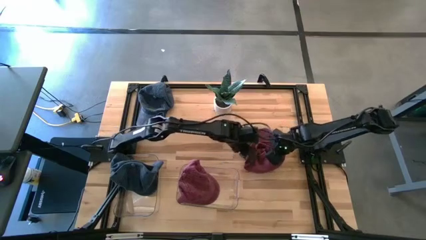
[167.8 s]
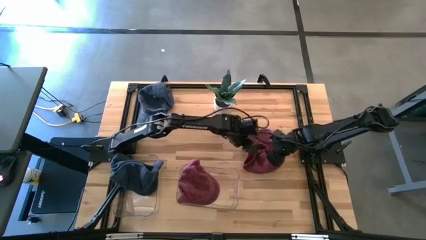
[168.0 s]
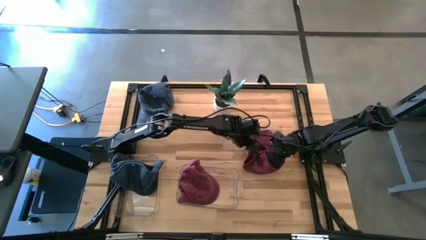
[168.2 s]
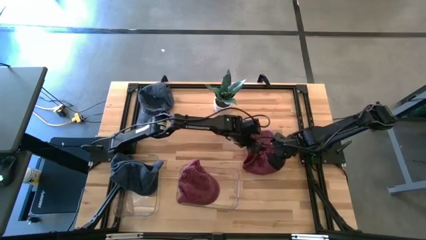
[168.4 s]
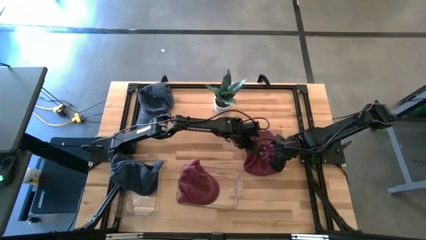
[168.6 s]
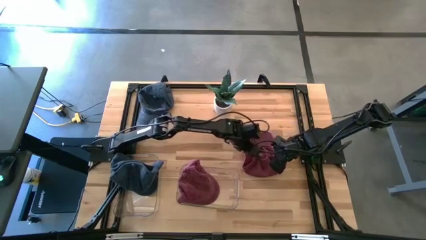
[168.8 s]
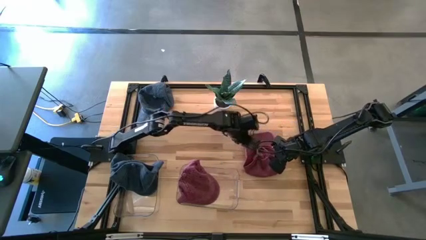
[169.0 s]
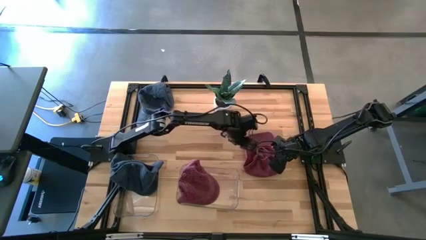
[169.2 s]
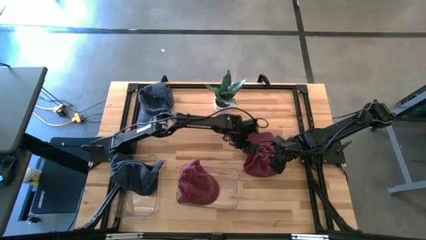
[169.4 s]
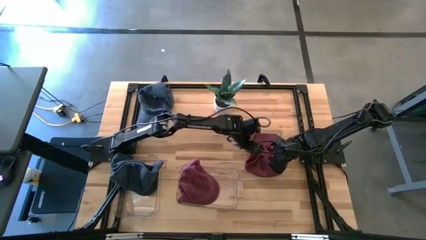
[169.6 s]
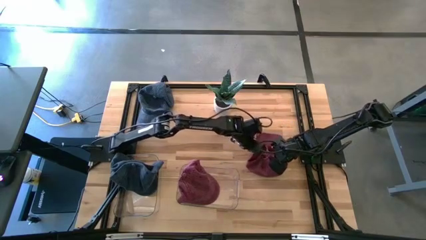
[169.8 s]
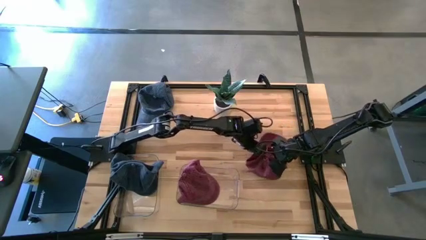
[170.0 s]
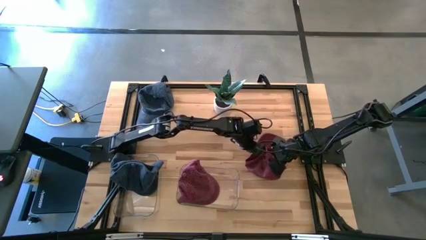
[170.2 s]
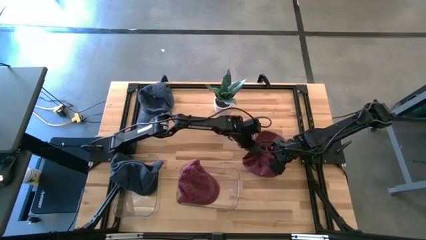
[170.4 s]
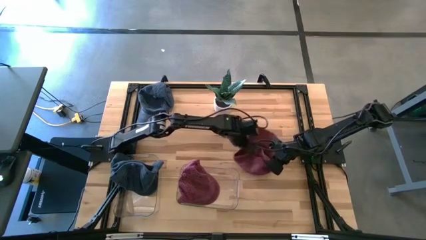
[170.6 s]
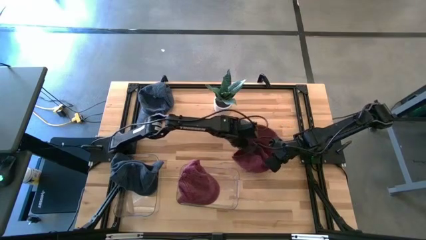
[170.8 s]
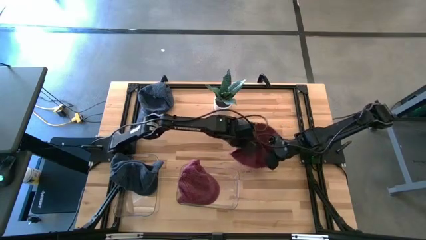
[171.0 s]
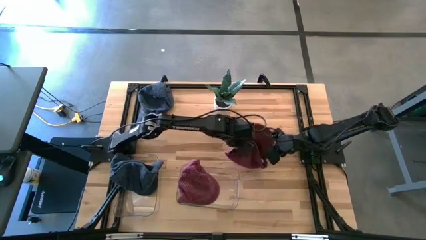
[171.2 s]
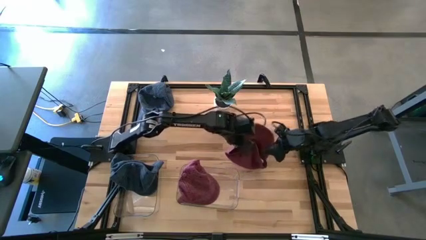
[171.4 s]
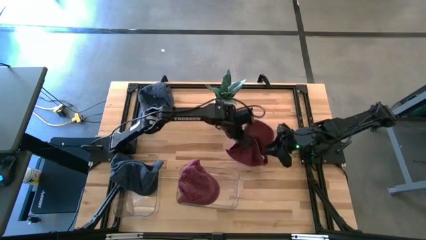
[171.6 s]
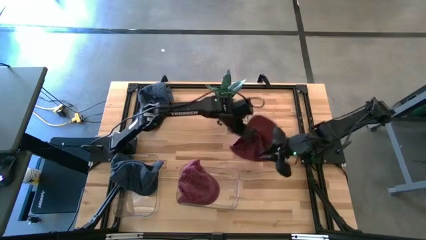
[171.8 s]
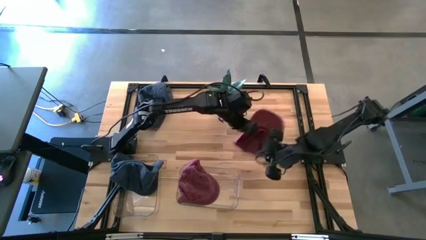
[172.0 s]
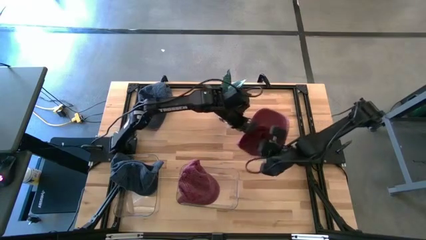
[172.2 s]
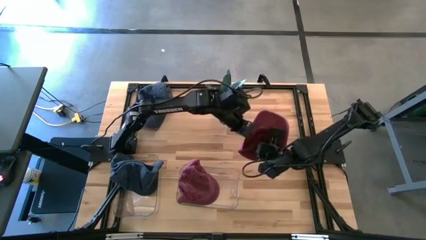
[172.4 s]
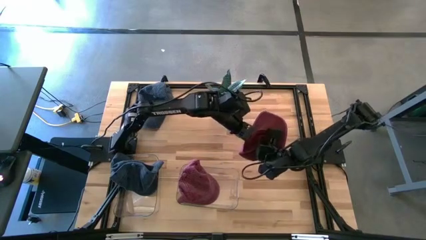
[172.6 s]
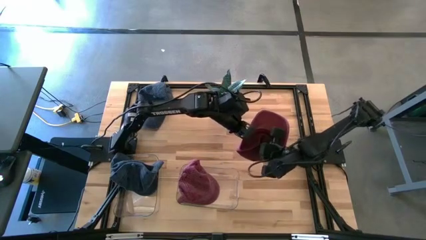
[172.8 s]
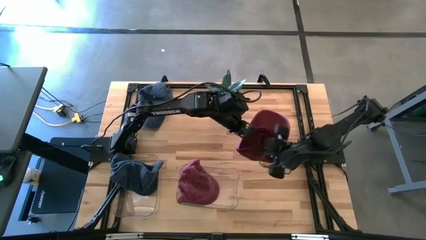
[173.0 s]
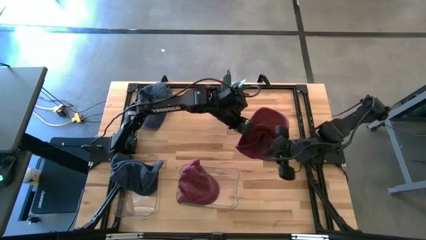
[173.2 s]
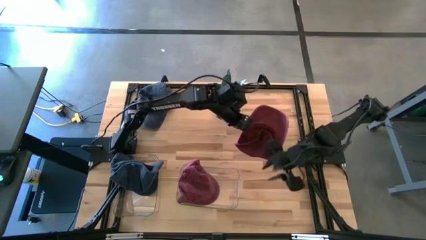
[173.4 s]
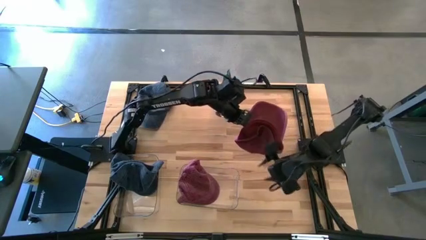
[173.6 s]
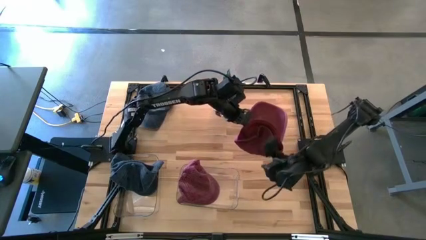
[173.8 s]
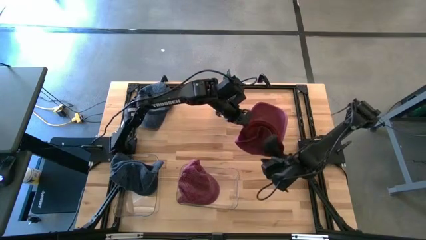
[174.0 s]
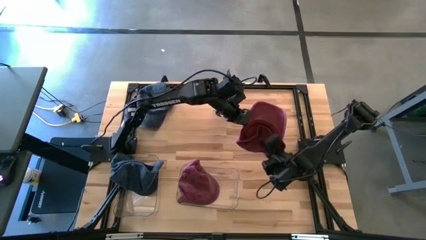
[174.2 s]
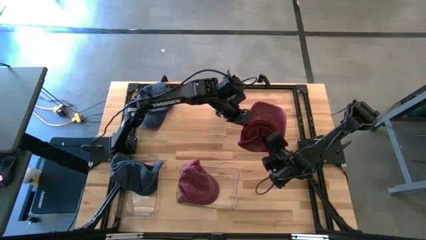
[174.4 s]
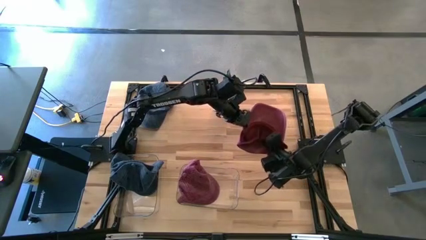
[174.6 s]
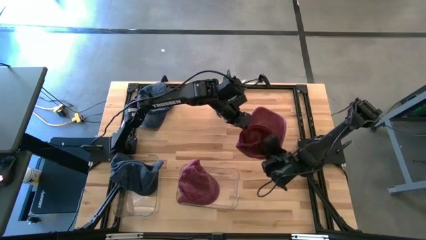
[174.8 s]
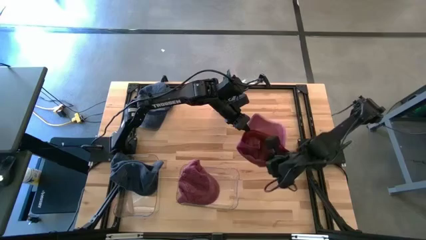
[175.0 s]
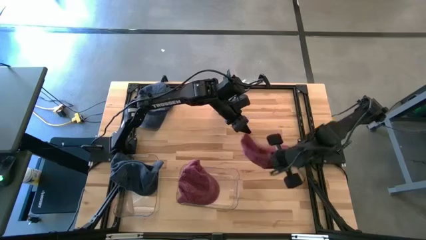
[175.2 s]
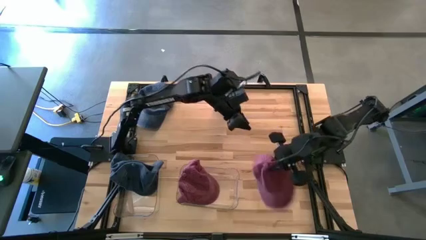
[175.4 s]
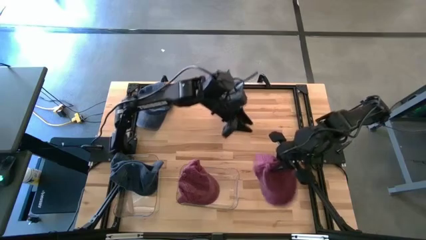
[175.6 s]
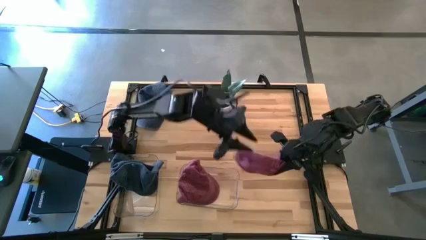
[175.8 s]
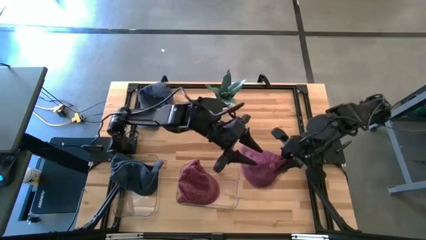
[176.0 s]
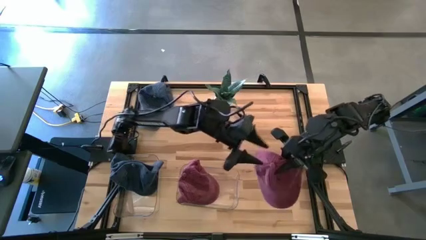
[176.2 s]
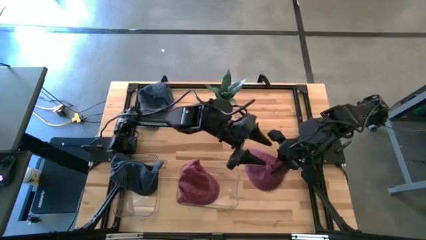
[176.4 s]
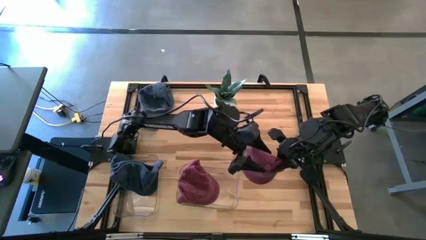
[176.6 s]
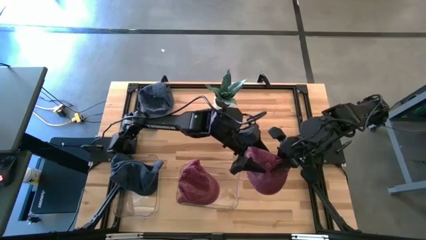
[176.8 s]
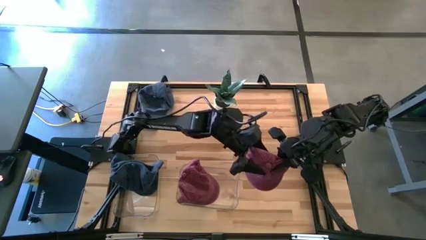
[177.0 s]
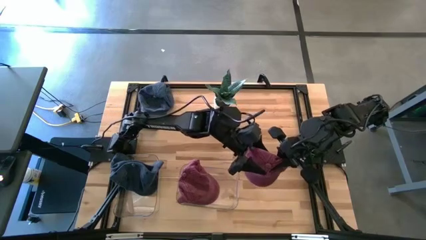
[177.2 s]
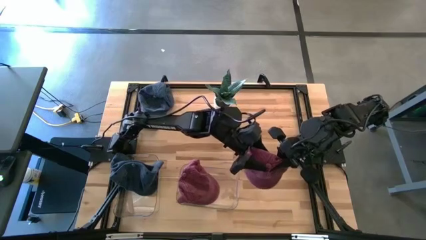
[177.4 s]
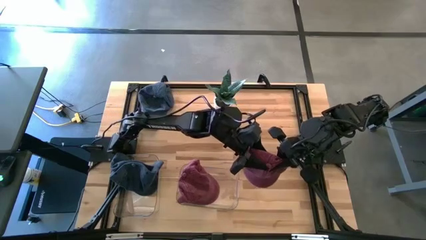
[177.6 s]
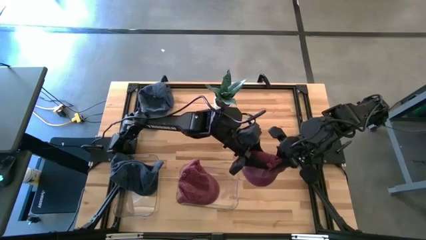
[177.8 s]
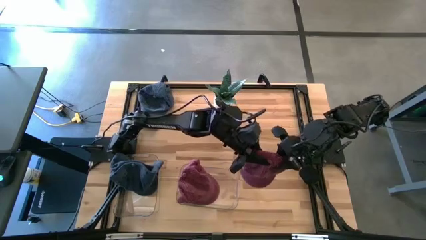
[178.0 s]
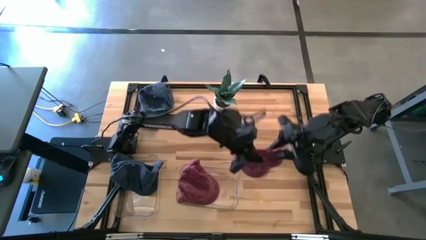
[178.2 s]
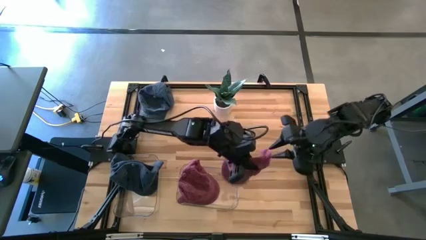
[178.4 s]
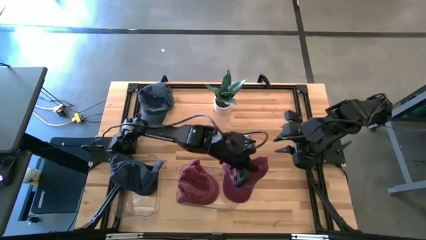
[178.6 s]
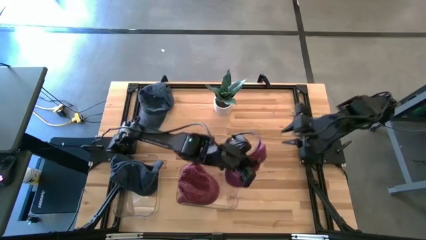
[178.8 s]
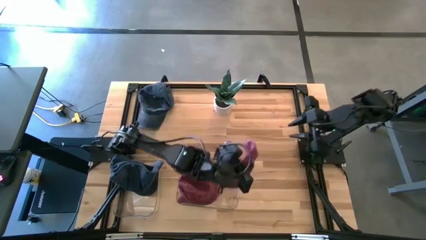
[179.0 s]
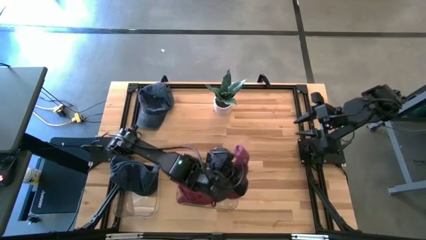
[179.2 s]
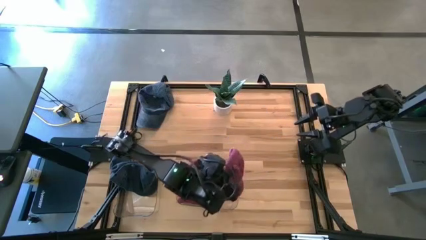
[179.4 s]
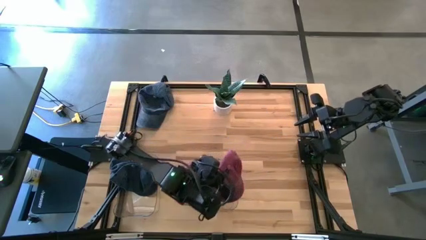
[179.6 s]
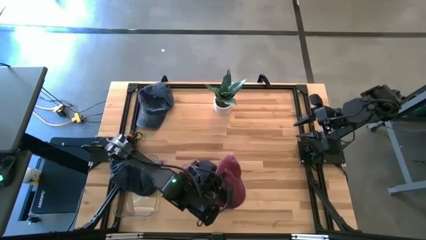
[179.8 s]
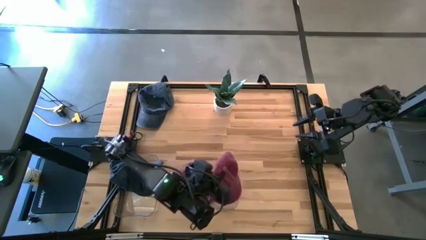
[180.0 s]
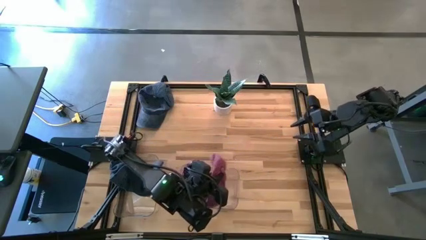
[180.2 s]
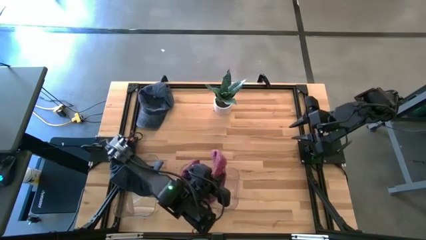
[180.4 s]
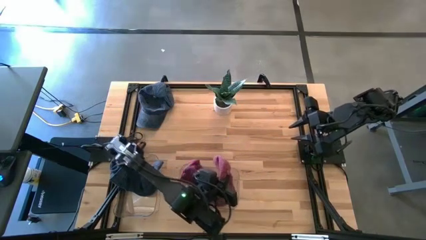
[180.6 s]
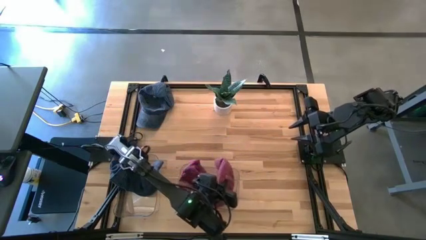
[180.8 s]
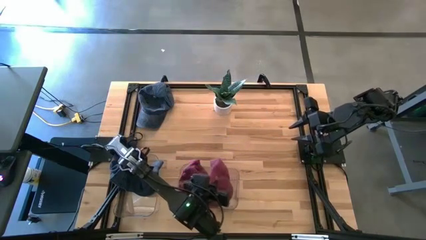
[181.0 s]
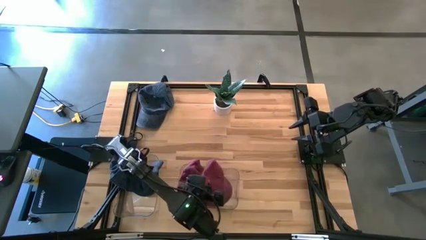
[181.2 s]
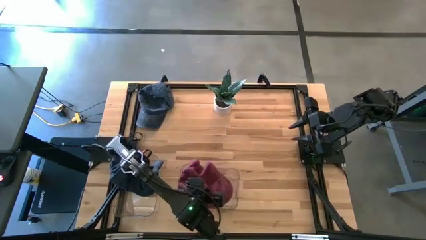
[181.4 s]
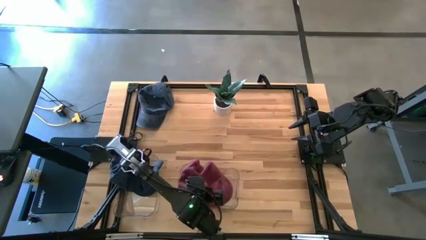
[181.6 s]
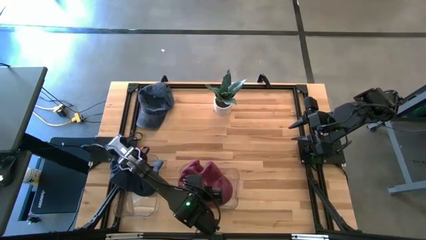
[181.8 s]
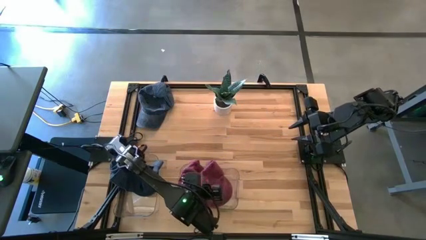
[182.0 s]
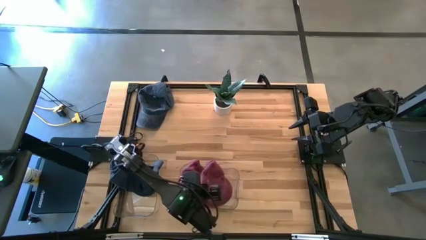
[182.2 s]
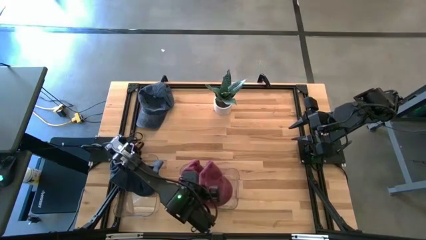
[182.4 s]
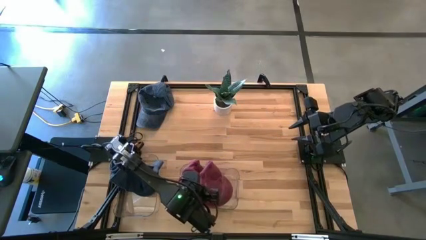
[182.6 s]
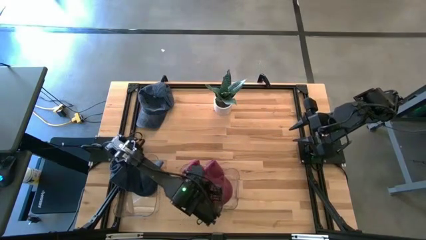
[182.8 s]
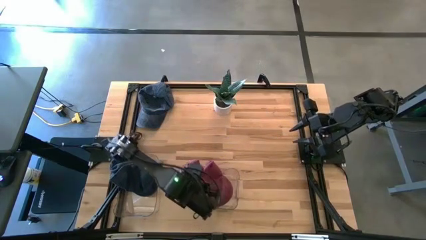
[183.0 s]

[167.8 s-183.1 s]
Task: Pick & Place hat
Put the red cap into the right transparent bin
